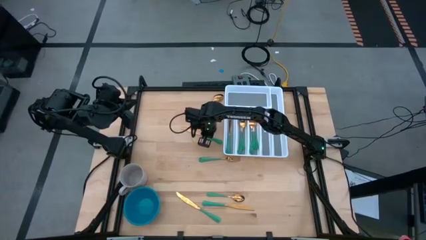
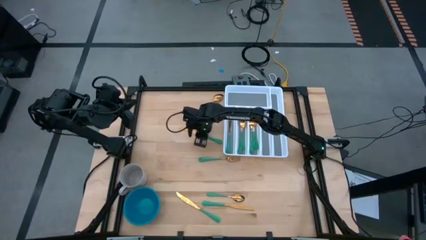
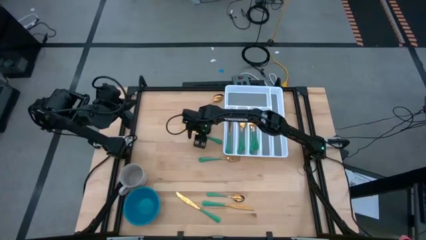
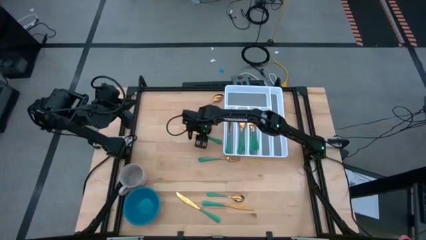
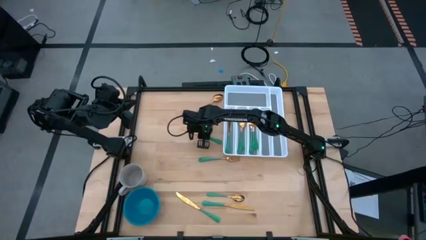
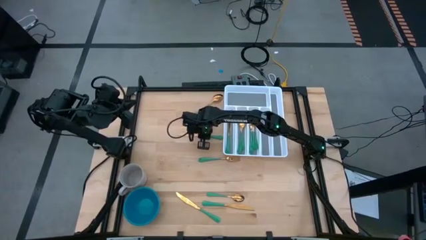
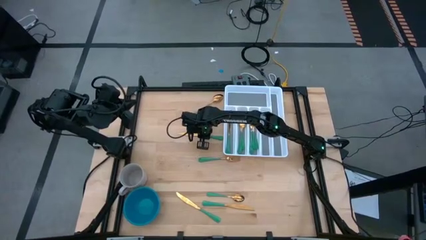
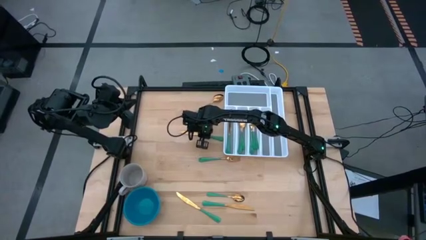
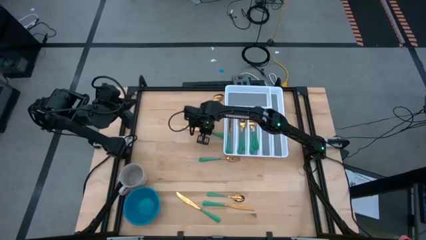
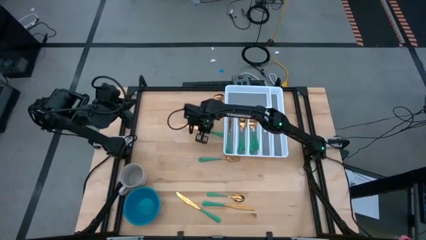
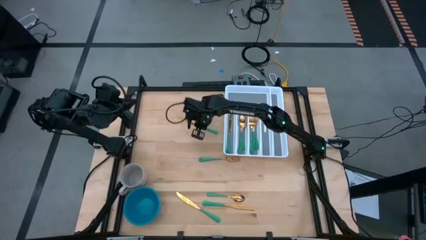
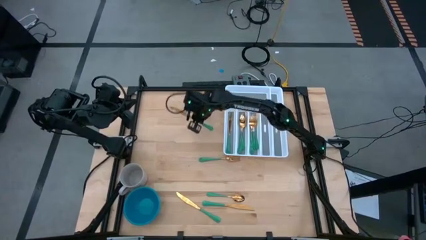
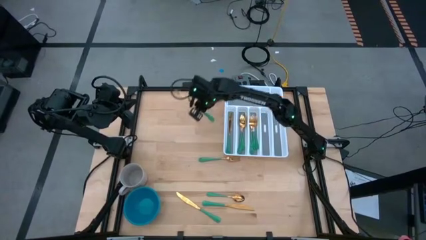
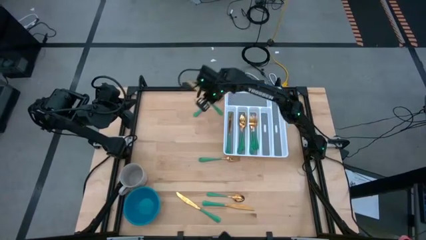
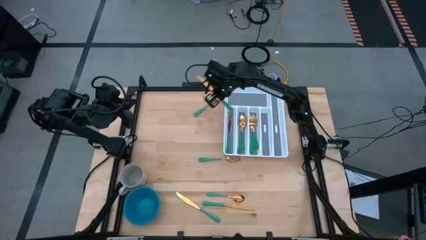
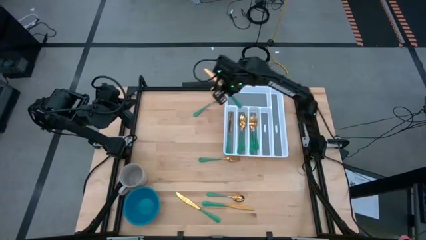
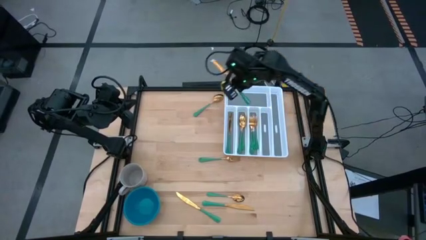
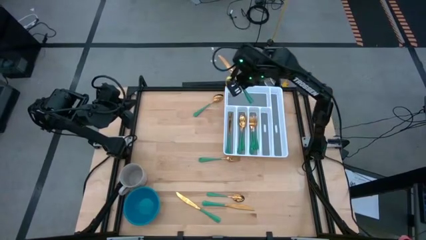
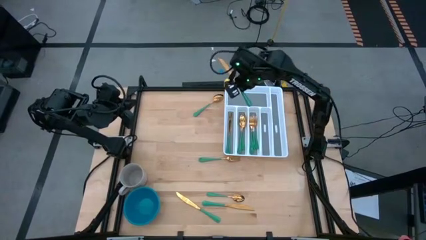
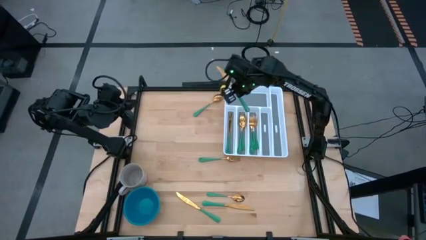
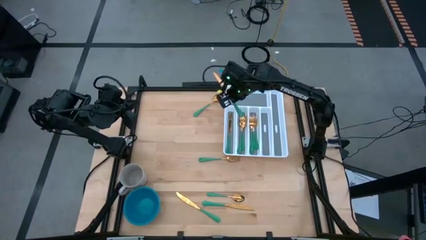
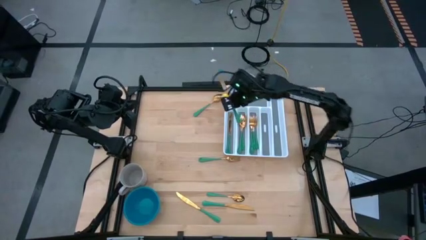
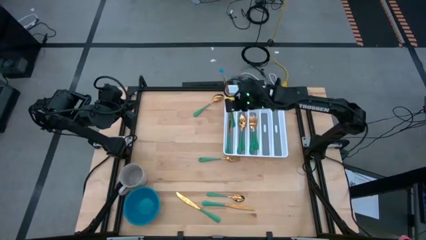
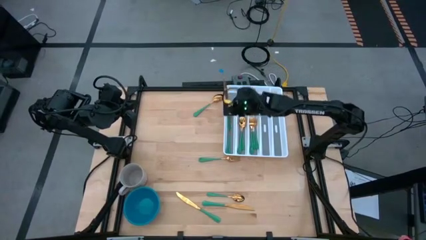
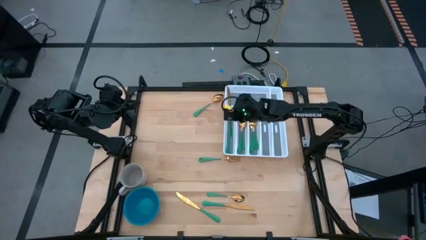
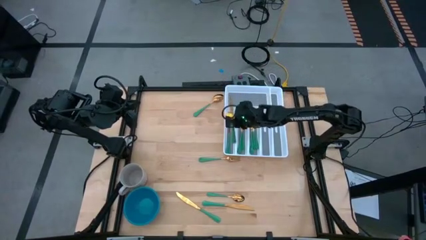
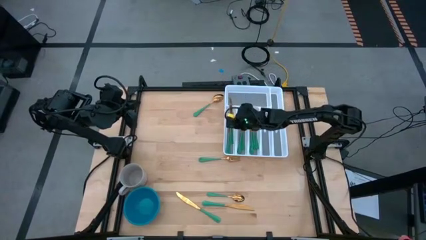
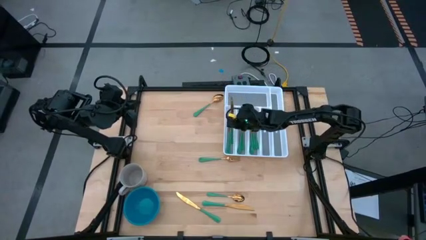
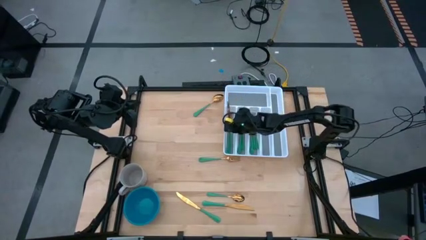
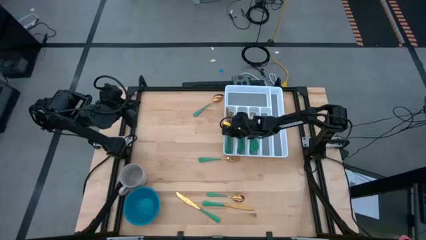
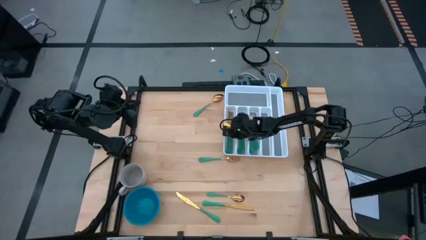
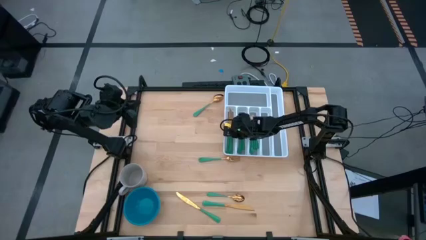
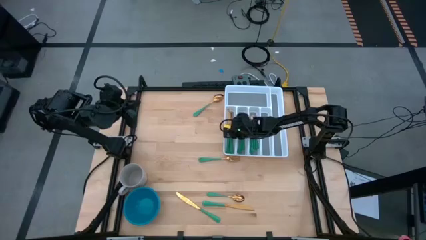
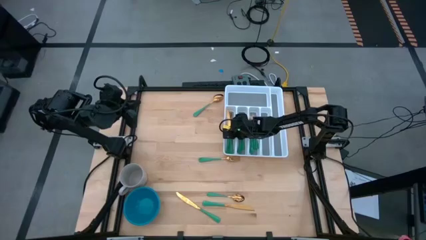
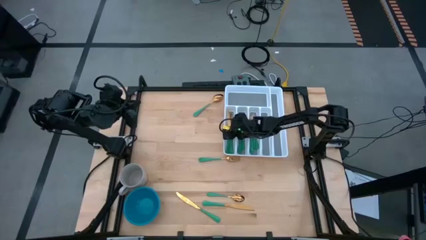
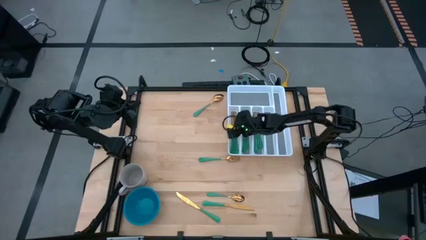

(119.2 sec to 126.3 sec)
Task: Sort silverware
Put the top green table knife into the white cutlery tray

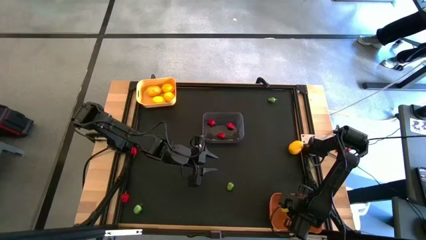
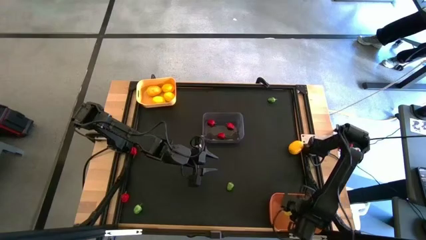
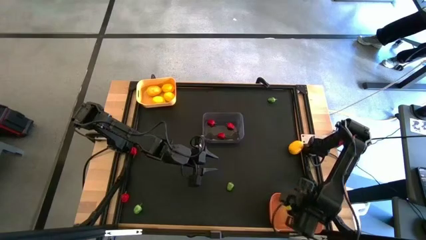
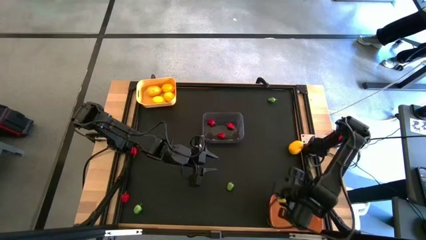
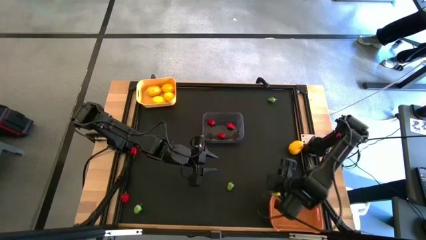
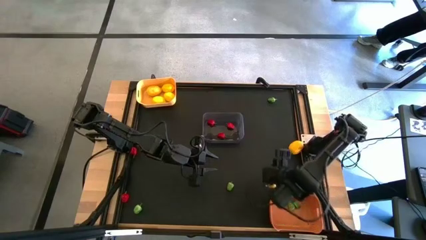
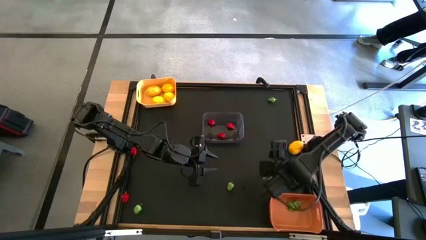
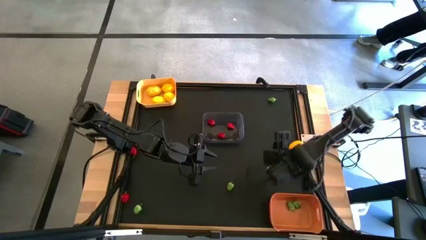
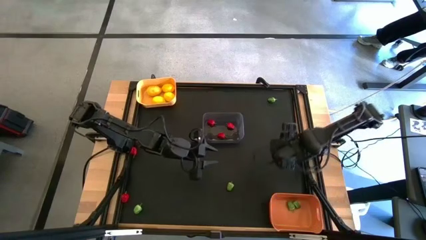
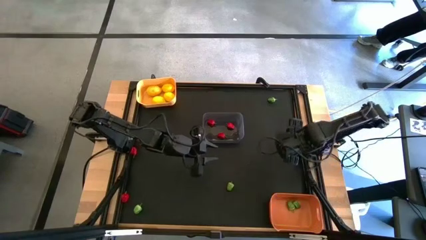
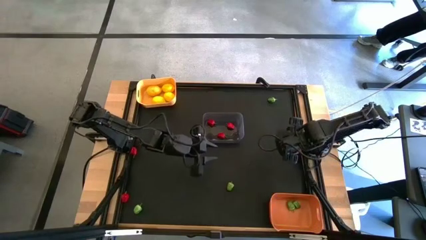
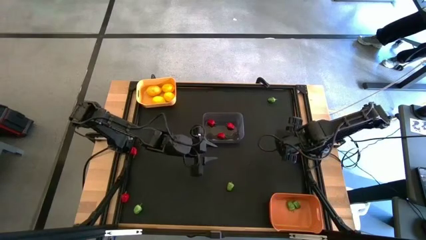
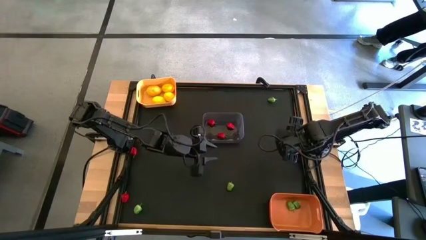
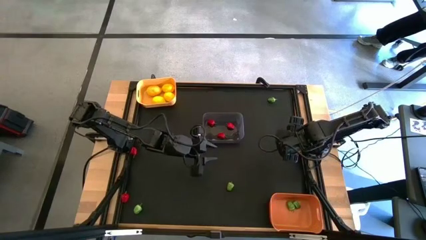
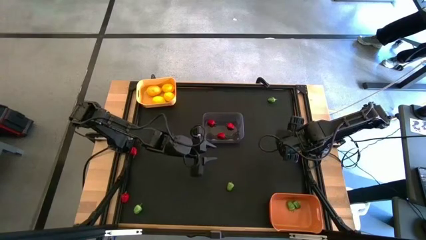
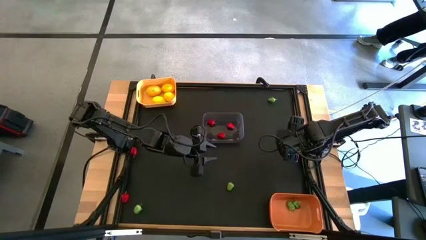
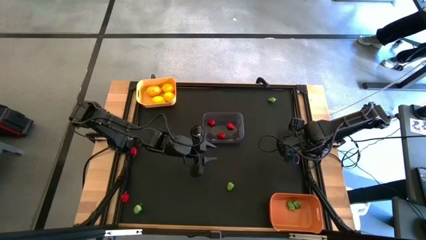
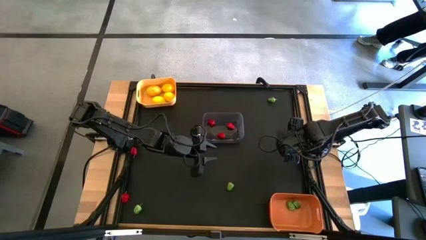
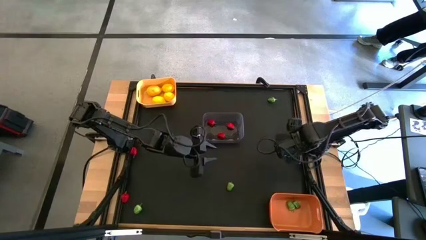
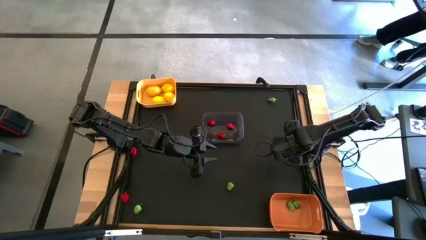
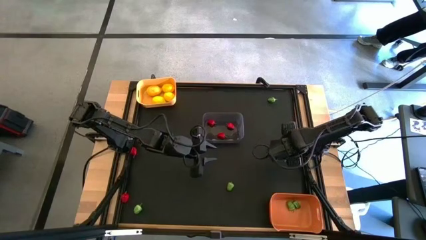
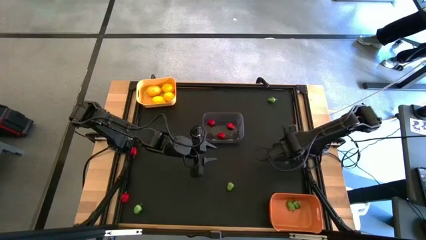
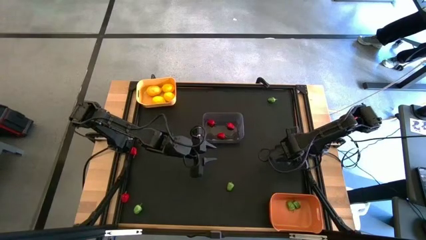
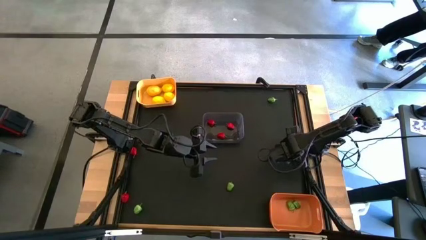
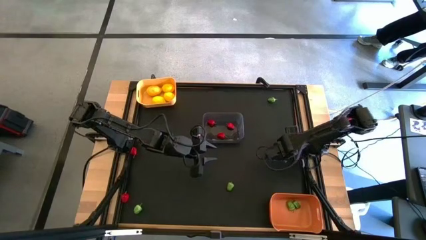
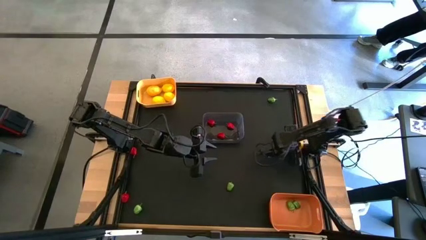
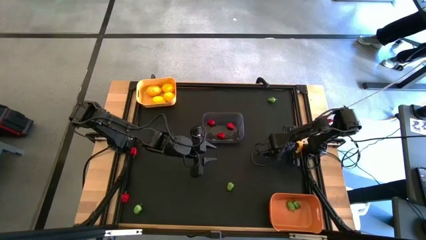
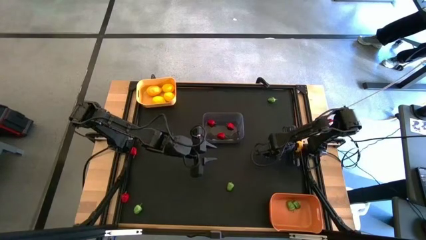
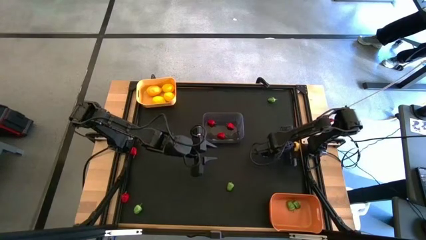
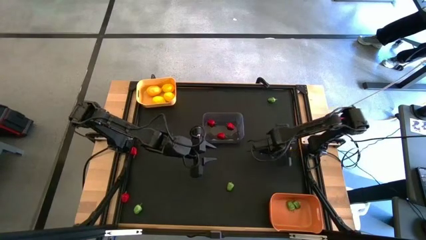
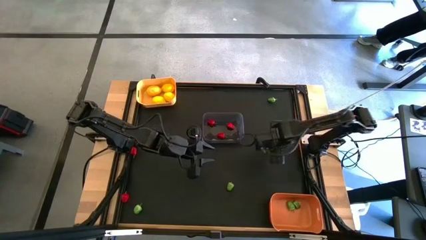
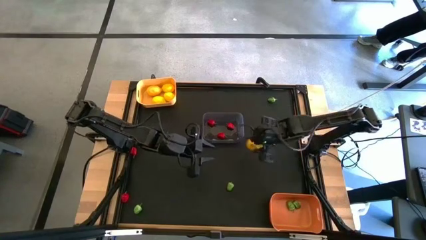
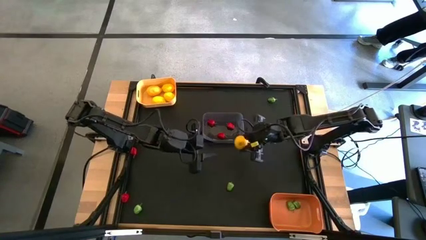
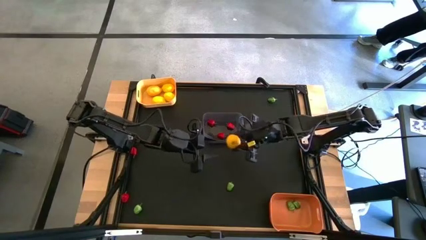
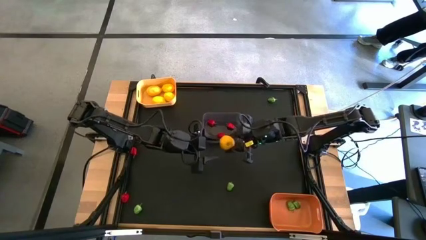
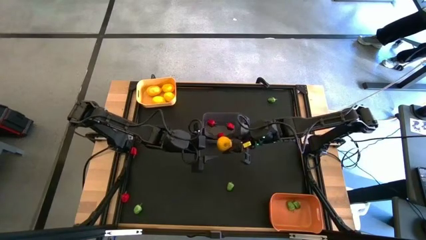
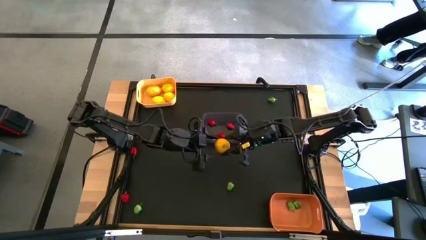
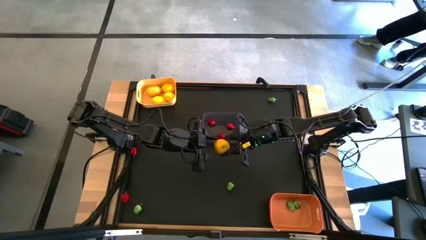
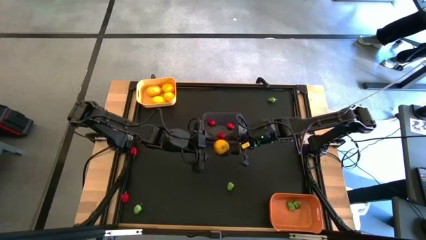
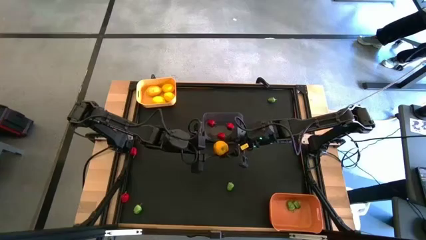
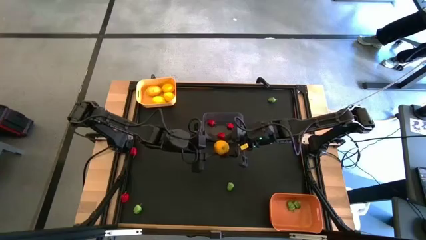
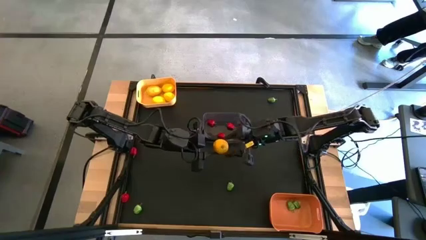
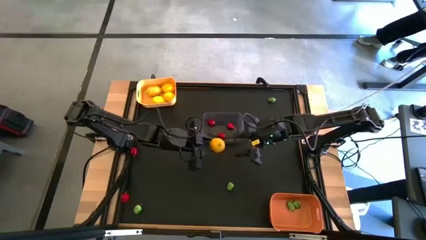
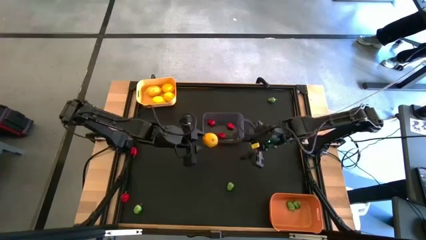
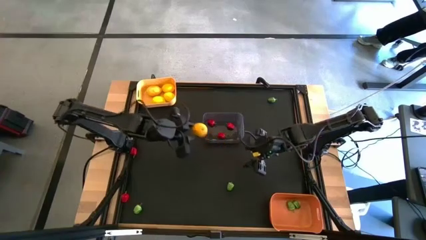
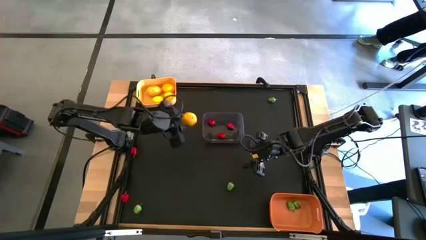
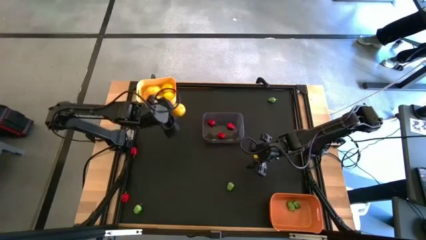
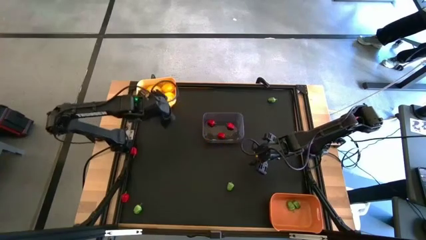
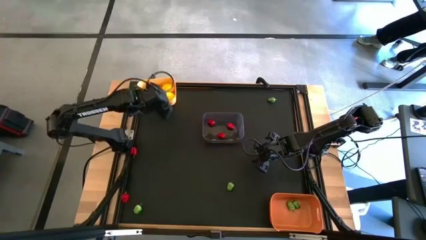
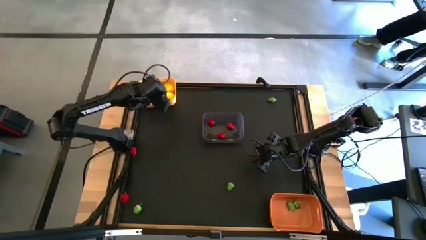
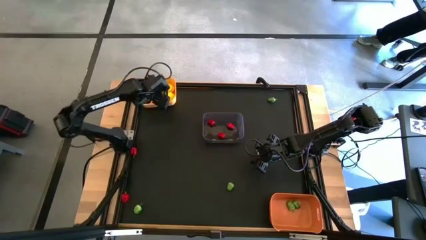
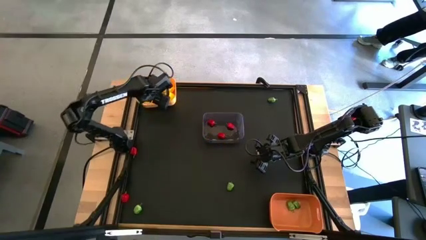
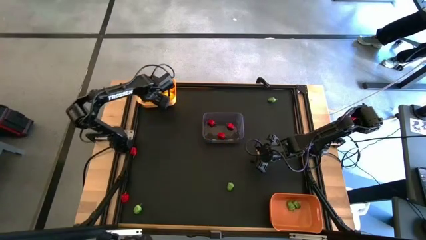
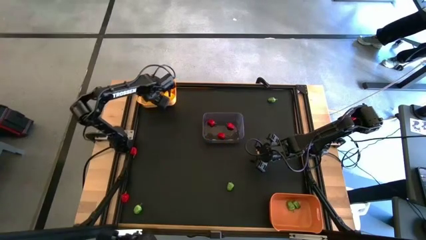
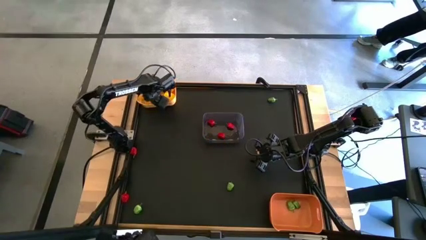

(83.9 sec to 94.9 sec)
Task: Sort produce into baskets
Put the yellow lemon into the yellow bin
